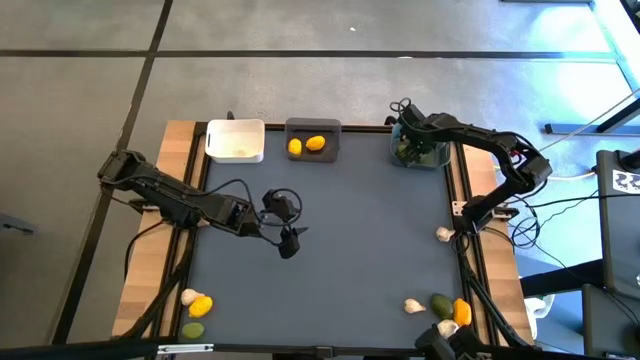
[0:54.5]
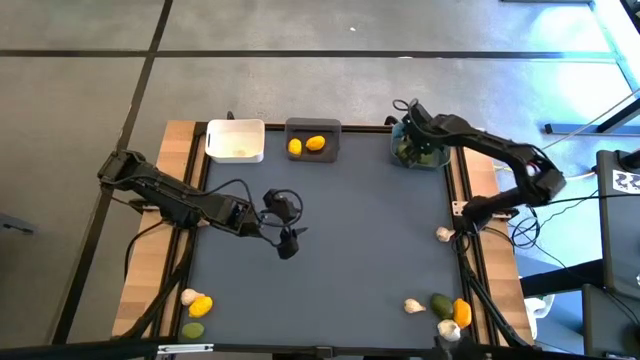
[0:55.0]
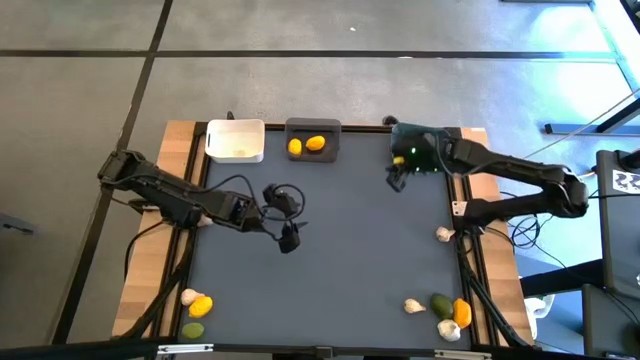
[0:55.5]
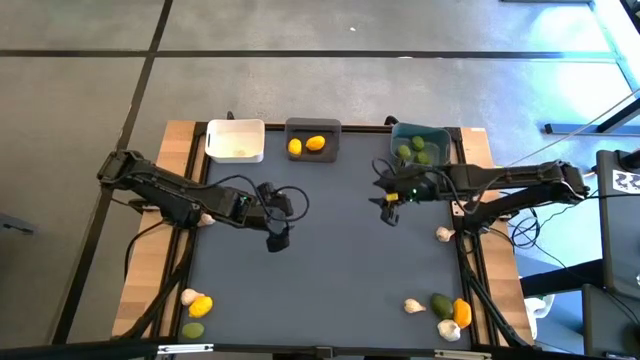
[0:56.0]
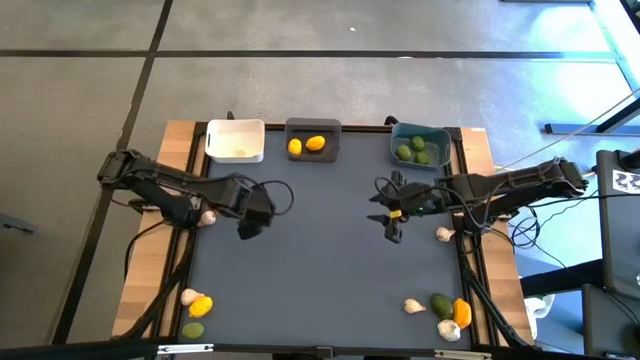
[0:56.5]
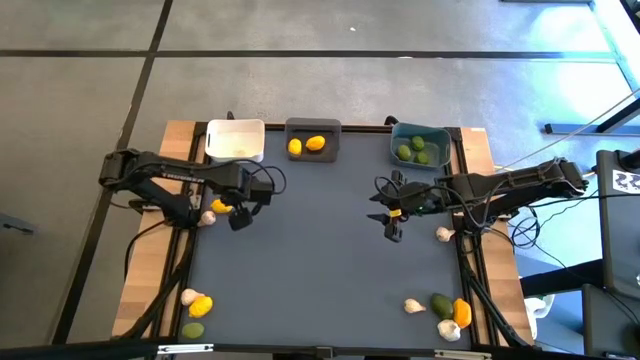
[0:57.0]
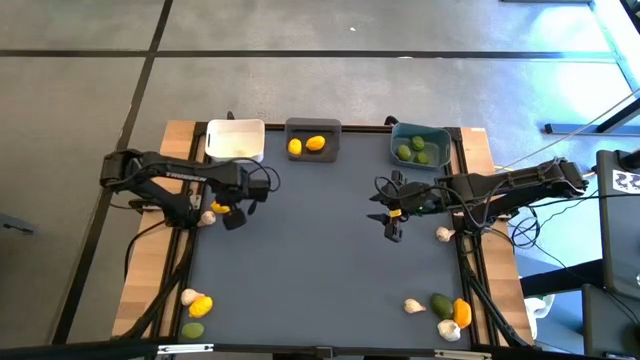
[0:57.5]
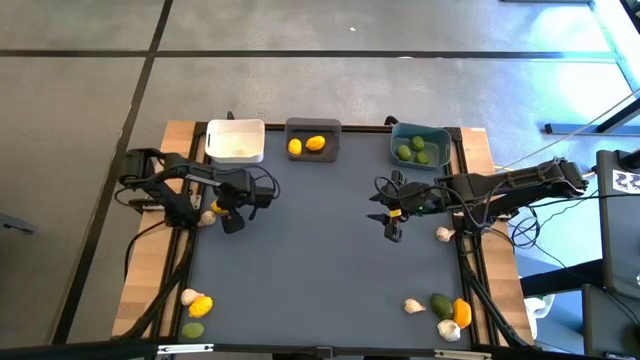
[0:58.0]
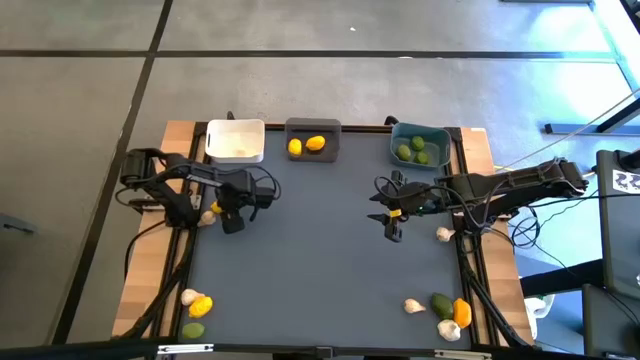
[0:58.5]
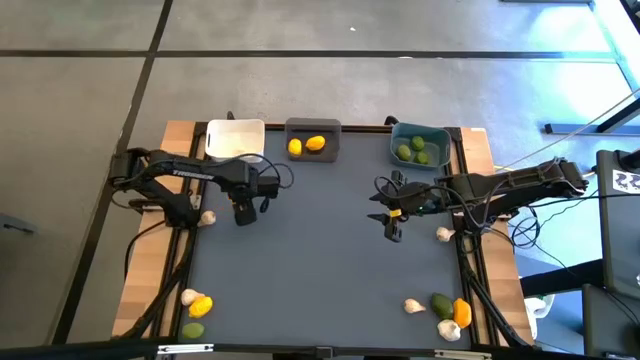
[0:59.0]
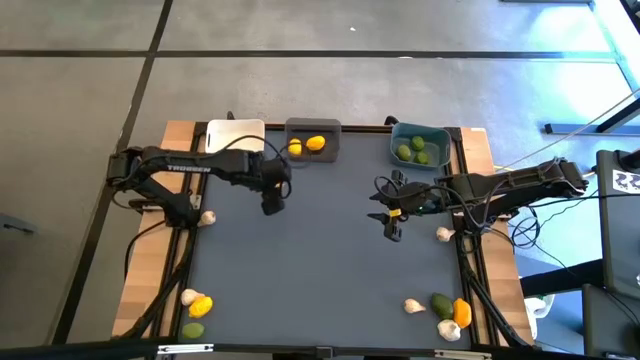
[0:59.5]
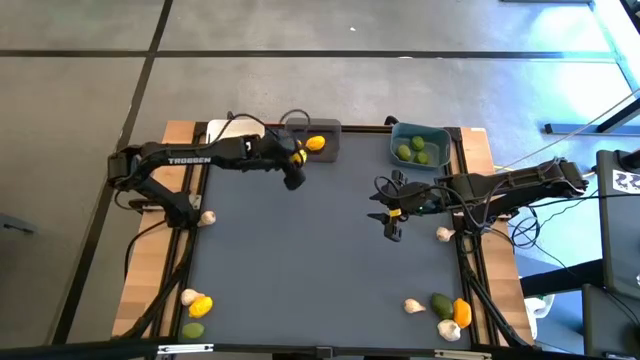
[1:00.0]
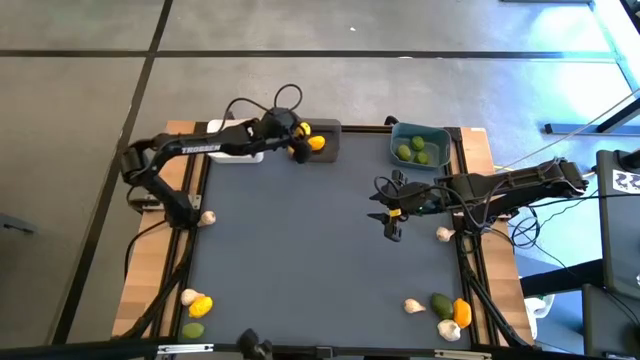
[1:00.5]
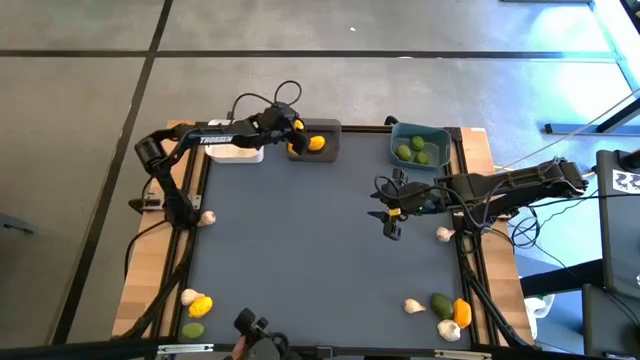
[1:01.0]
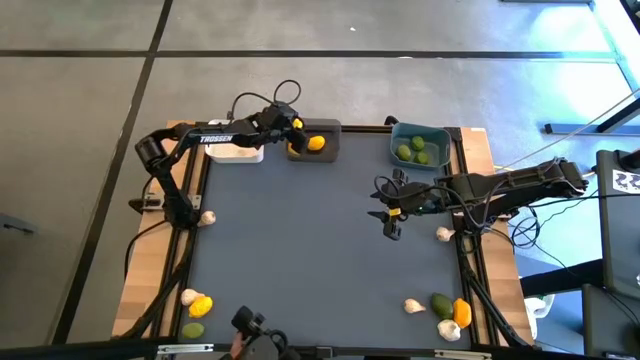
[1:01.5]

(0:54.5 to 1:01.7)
Task: Sort produce into baskets
Put the lemon into the black transparent bin

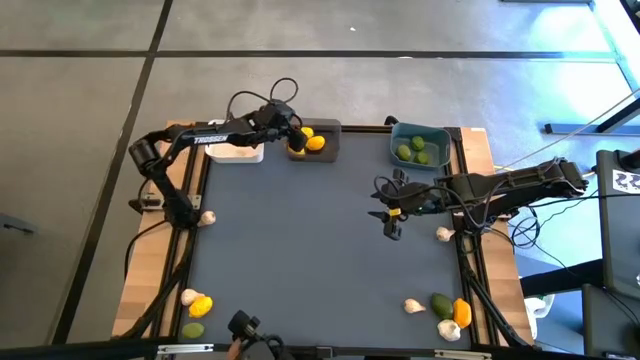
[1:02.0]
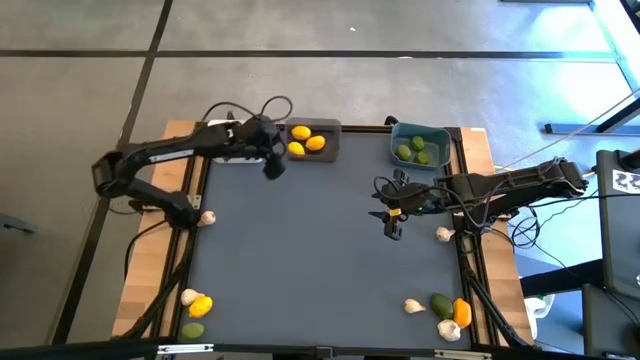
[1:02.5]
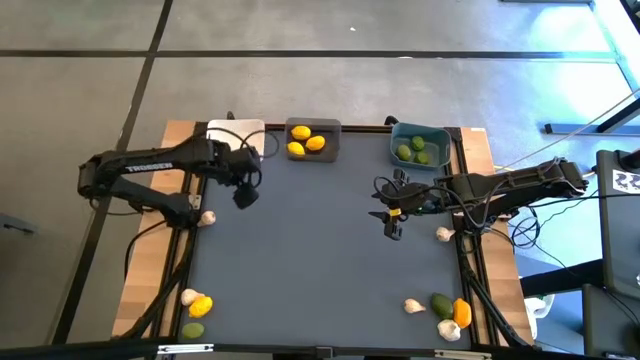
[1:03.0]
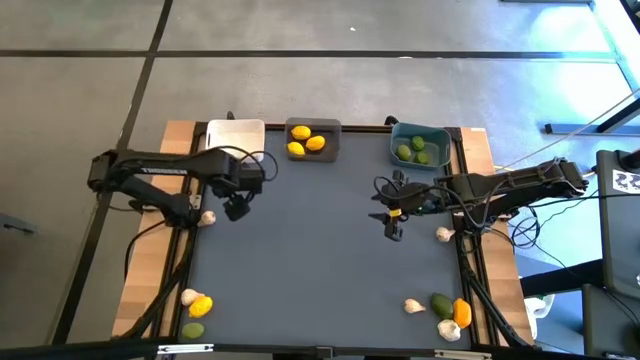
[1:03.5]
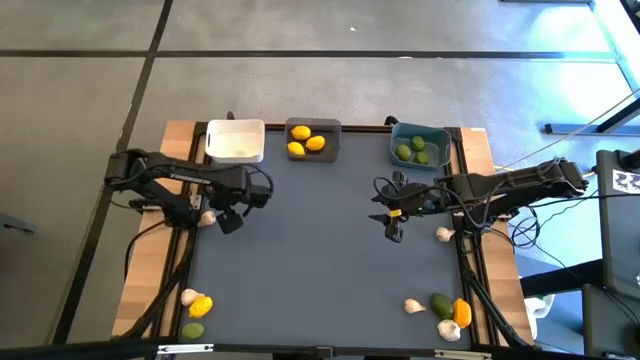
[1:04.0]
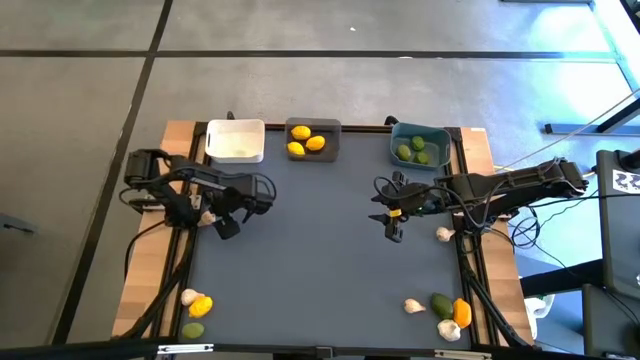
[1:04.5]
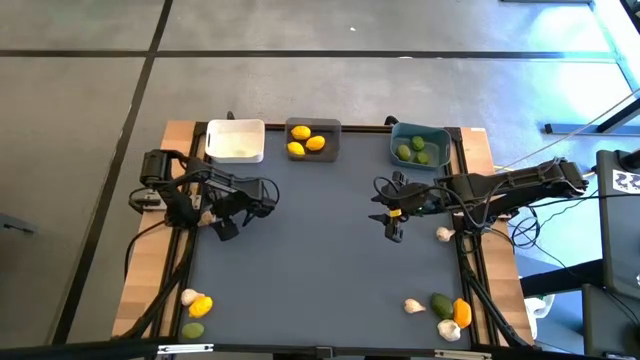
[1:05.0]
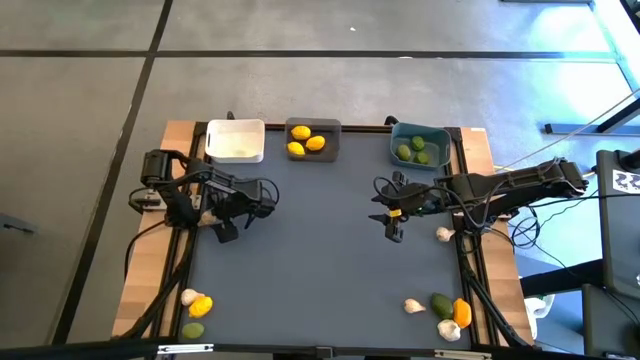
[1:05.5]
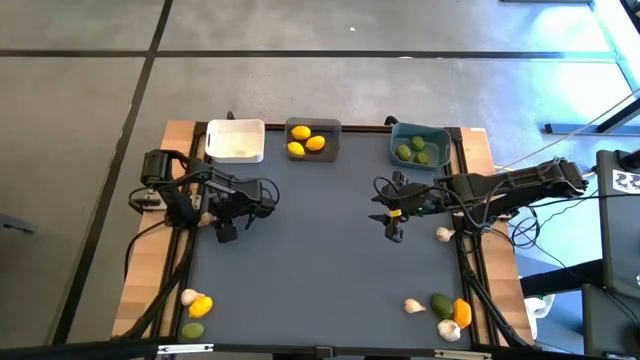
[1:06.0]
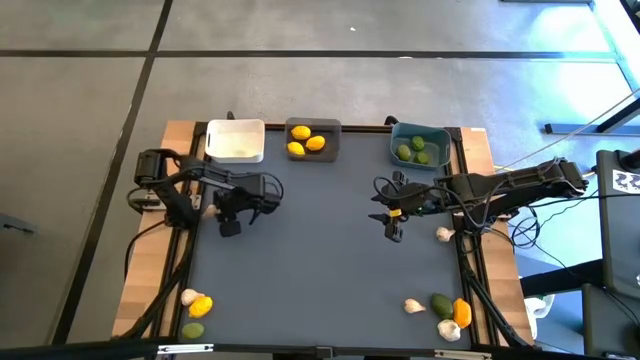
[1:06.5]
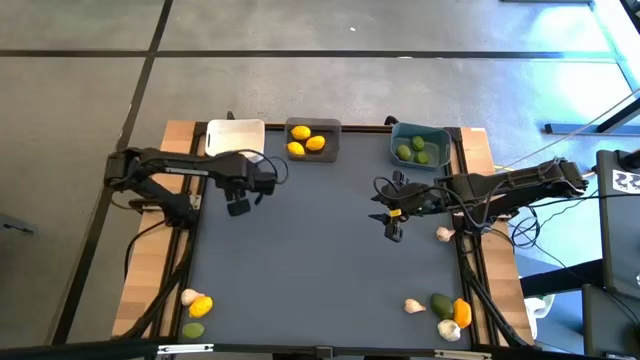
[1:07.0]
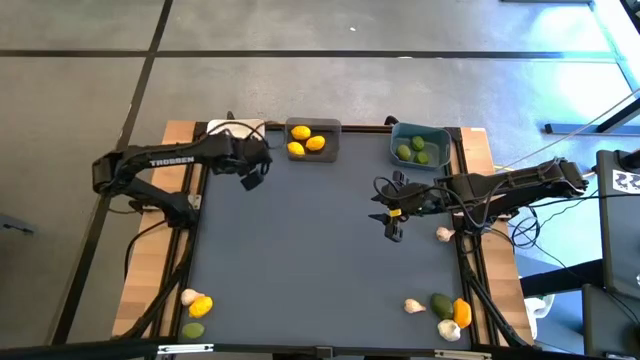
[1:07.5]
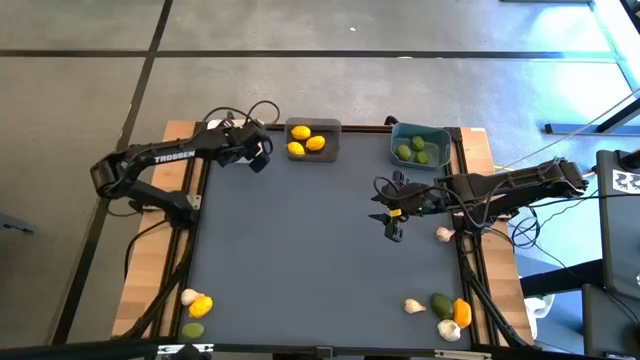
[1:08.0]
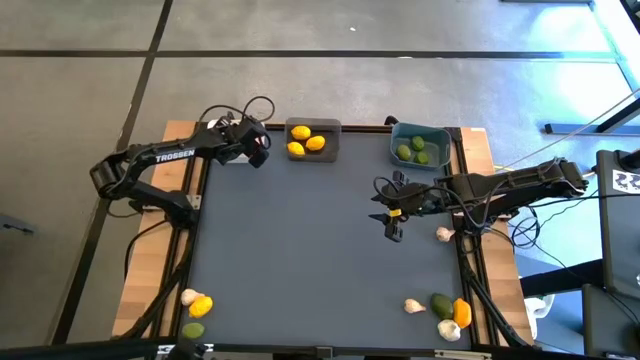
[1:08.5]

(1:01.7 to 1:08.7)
Put the garlic into the white bin

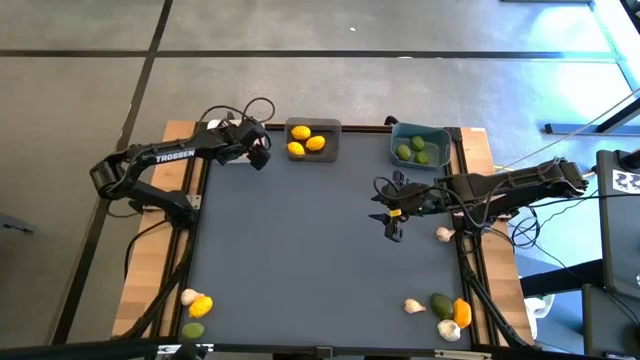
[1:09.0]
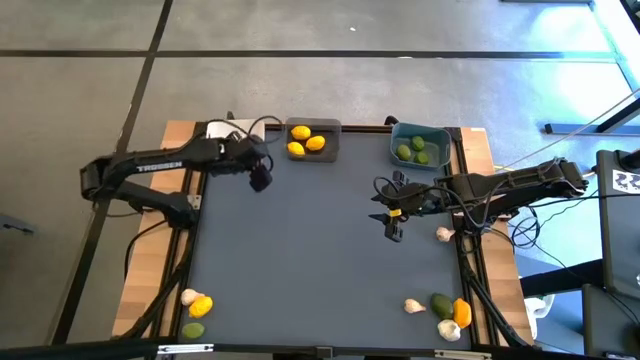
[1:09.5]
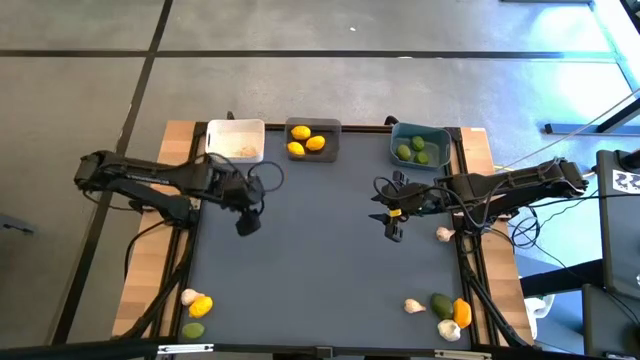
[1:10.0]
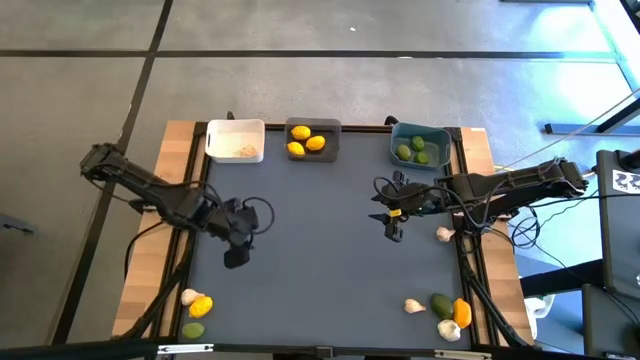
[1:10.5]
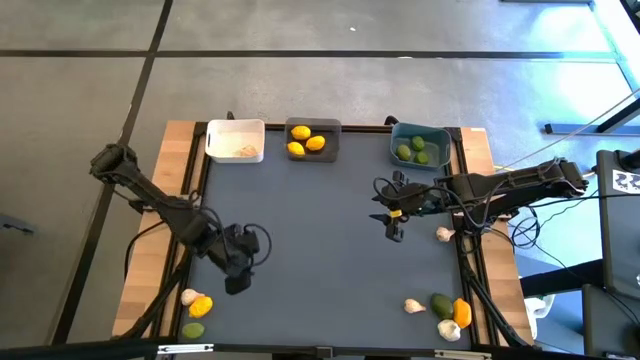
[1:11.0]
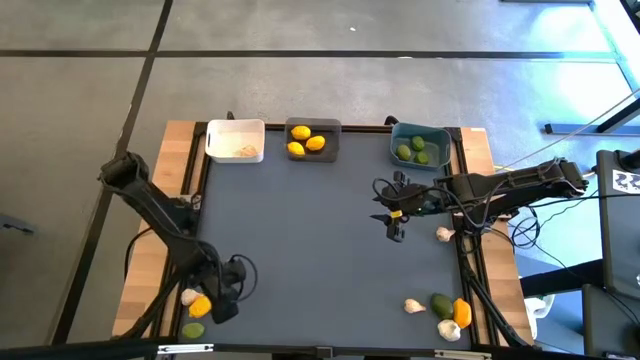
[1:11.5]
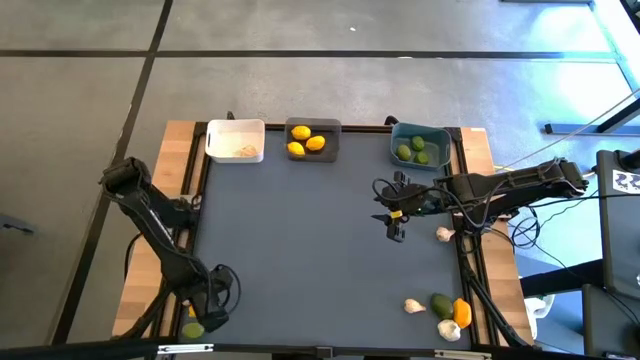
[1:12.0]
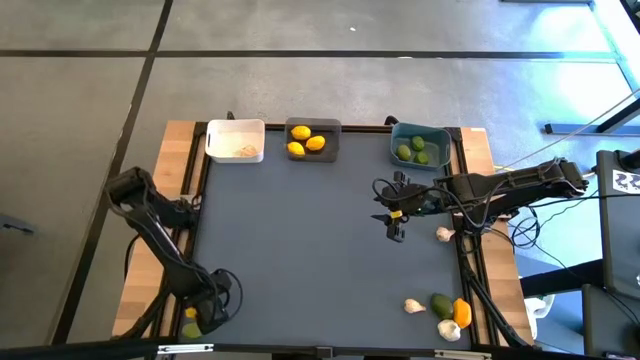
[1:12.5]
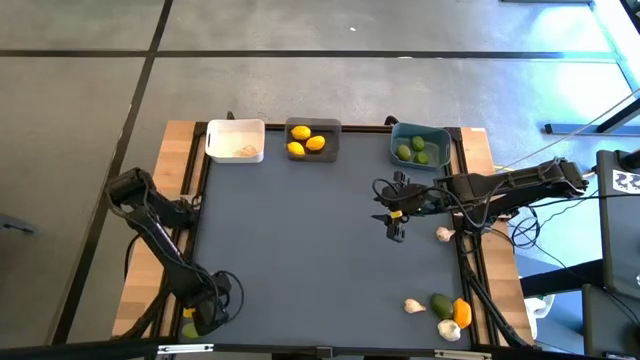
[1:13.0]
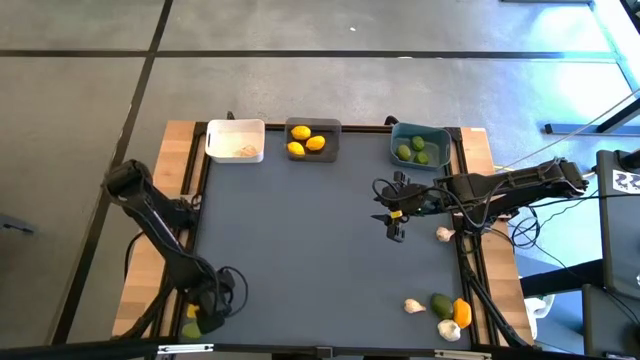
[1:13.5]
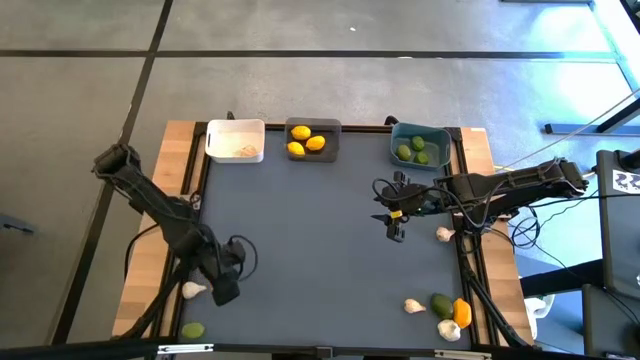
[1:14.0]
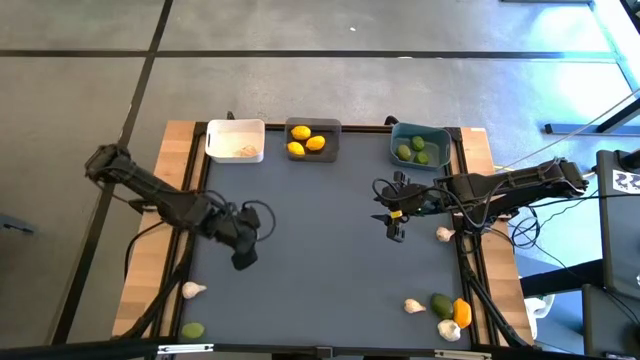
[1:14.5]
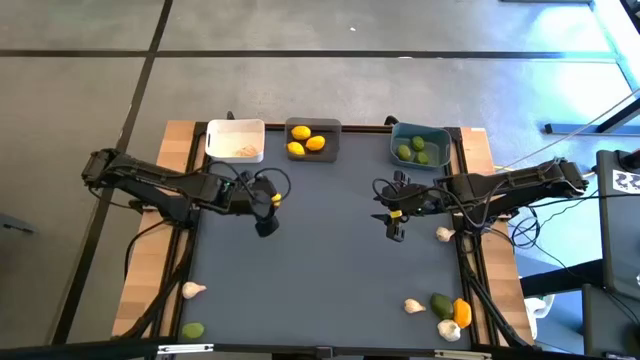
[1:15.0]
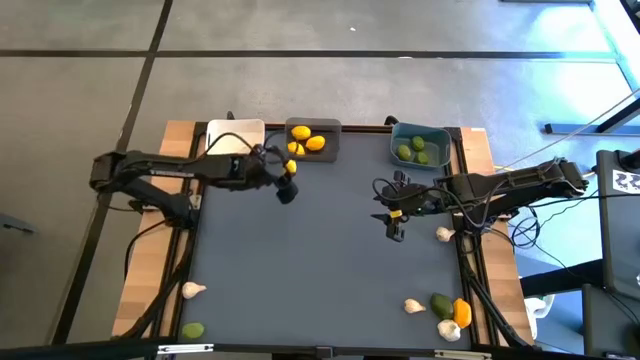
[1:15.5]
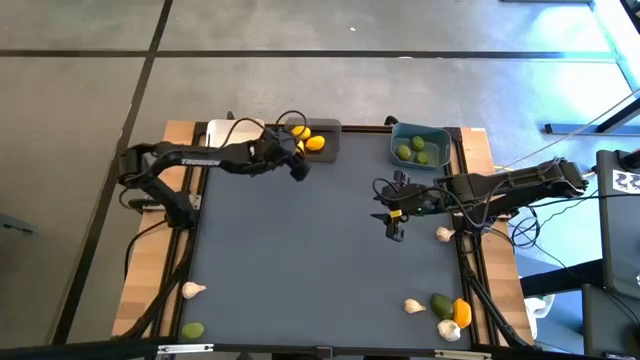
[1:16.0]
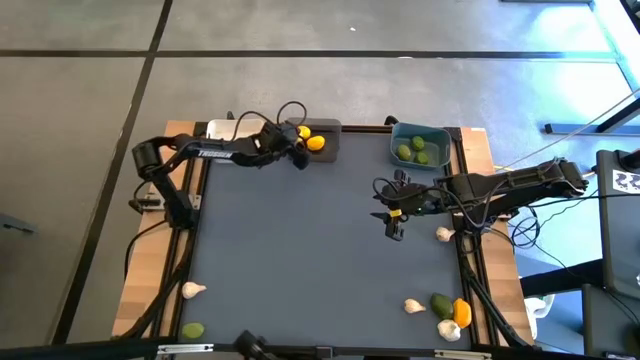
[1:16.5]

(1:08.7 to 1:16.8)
Put the lemon into the black transparent bin
